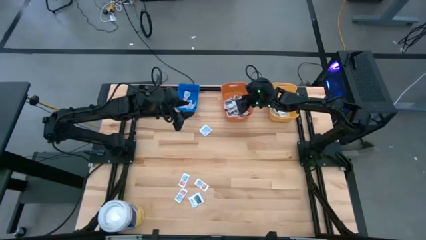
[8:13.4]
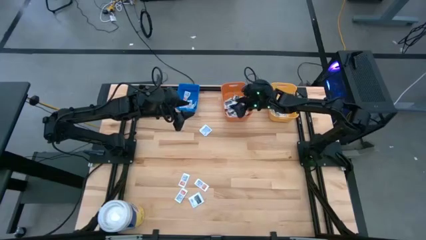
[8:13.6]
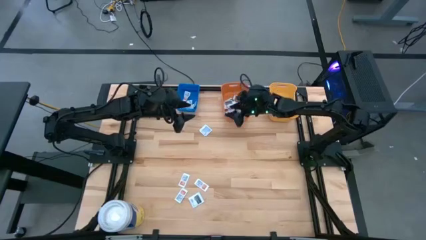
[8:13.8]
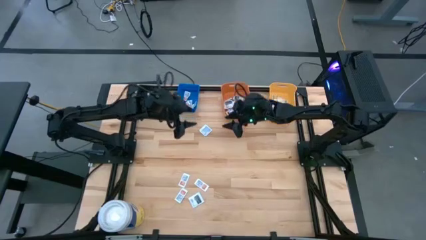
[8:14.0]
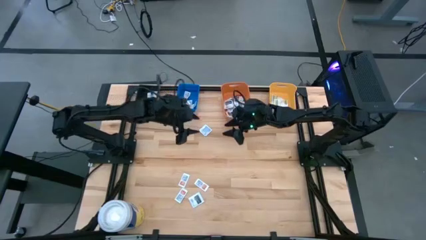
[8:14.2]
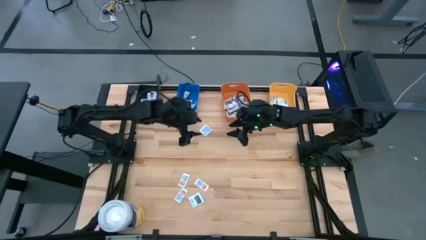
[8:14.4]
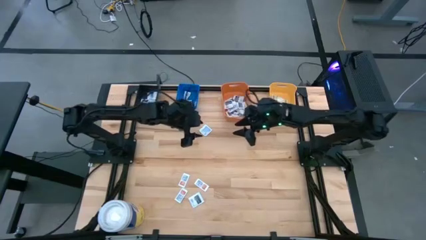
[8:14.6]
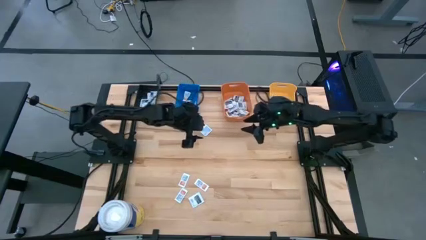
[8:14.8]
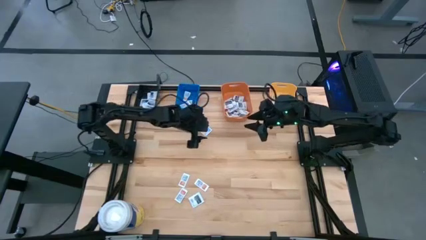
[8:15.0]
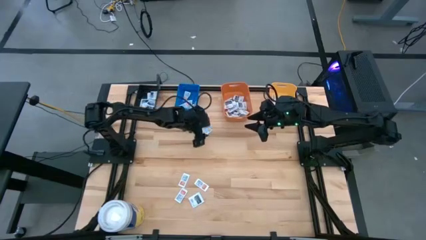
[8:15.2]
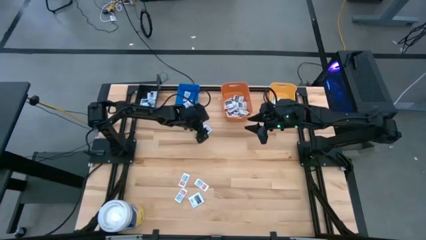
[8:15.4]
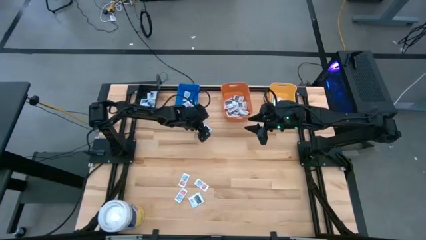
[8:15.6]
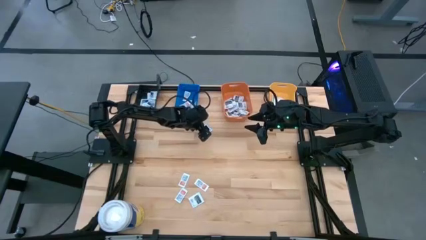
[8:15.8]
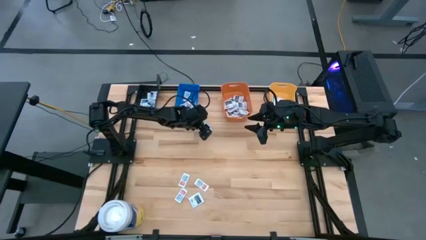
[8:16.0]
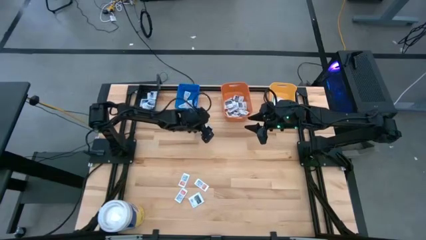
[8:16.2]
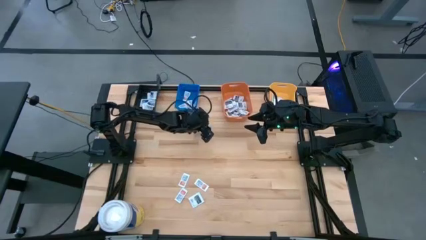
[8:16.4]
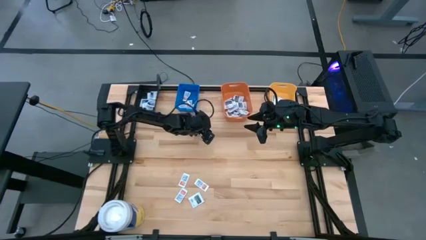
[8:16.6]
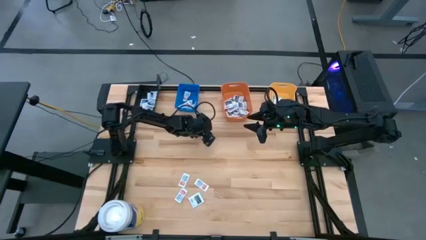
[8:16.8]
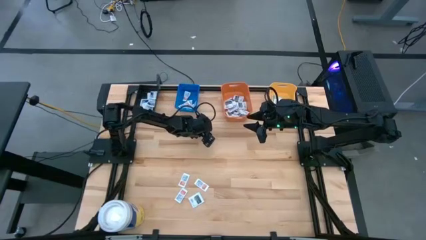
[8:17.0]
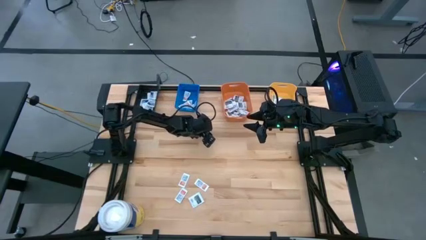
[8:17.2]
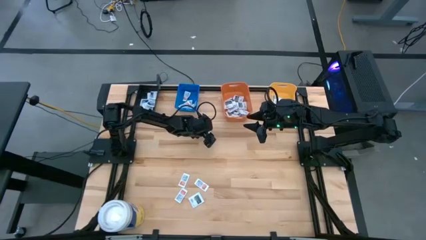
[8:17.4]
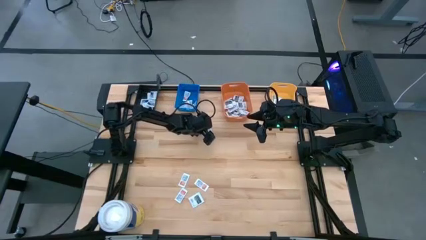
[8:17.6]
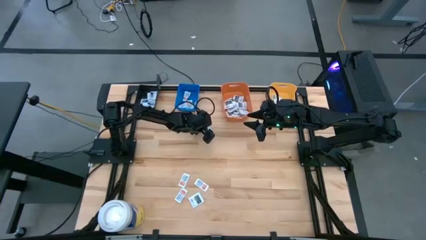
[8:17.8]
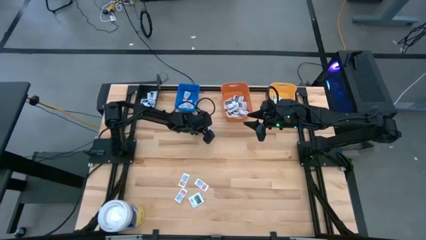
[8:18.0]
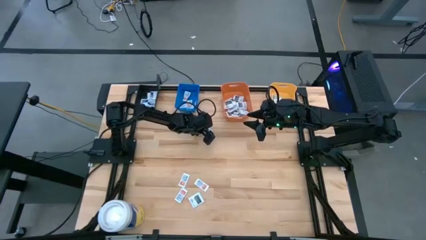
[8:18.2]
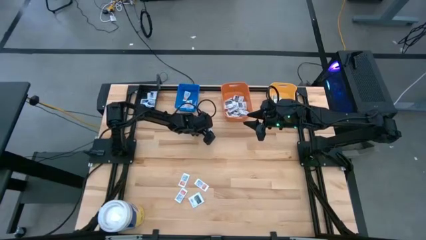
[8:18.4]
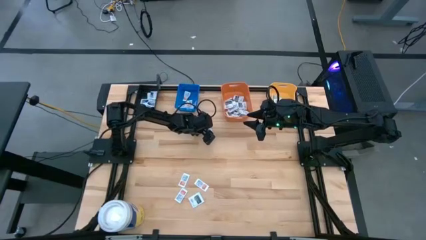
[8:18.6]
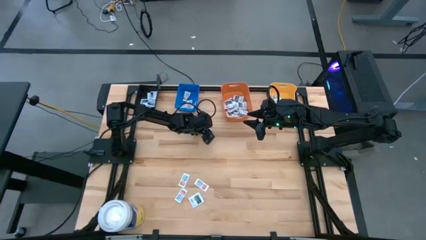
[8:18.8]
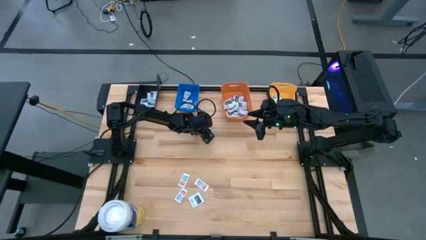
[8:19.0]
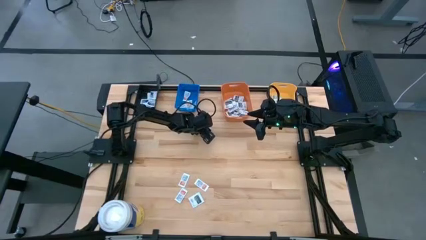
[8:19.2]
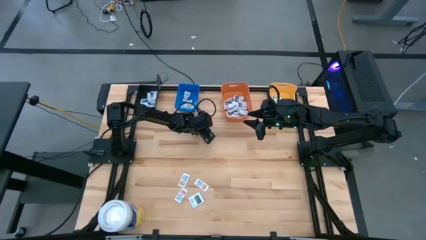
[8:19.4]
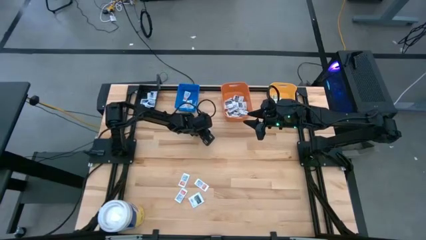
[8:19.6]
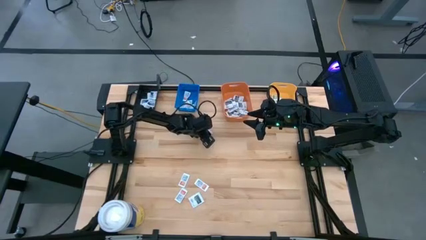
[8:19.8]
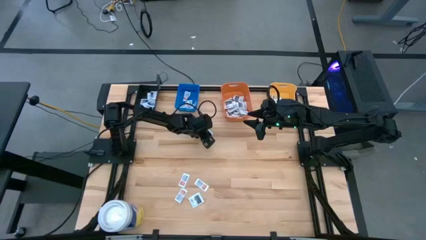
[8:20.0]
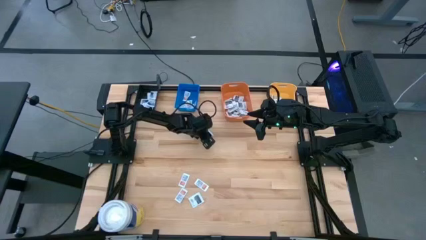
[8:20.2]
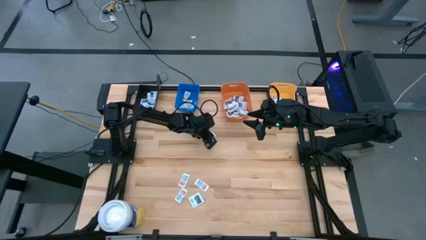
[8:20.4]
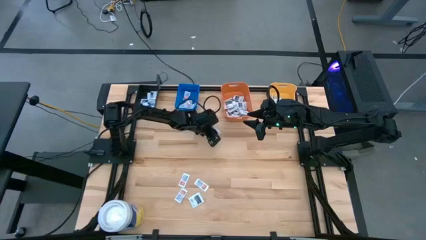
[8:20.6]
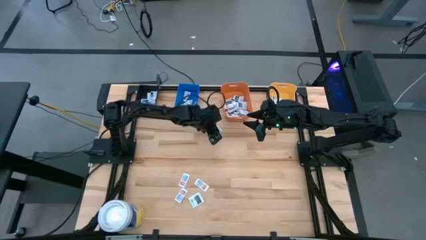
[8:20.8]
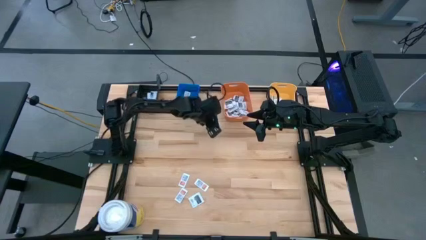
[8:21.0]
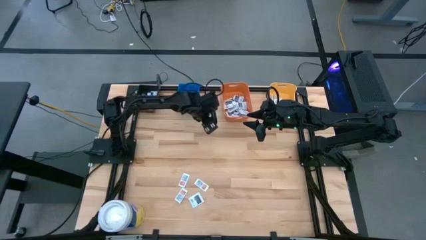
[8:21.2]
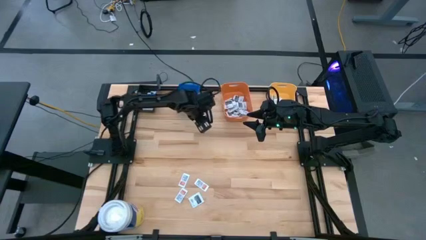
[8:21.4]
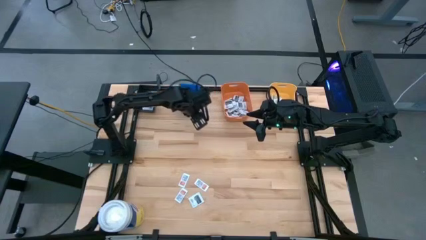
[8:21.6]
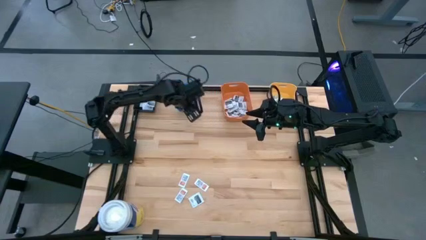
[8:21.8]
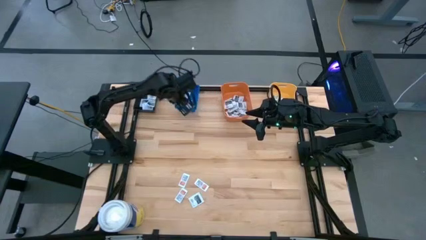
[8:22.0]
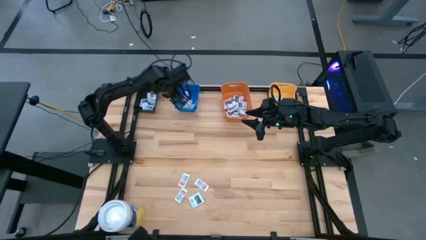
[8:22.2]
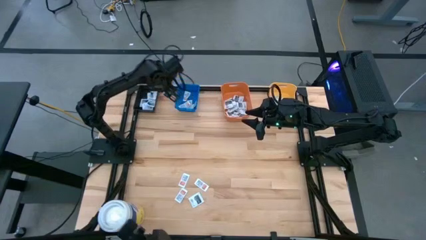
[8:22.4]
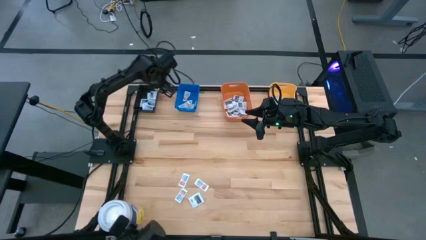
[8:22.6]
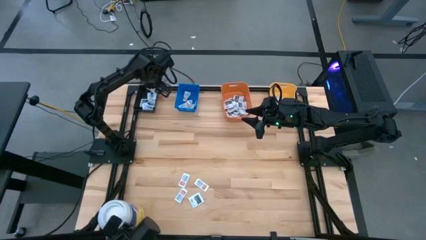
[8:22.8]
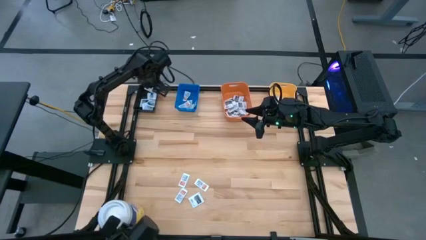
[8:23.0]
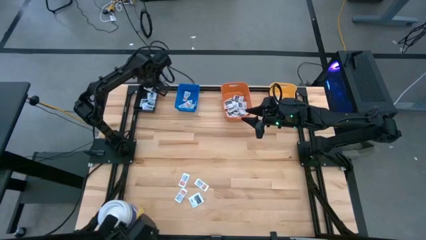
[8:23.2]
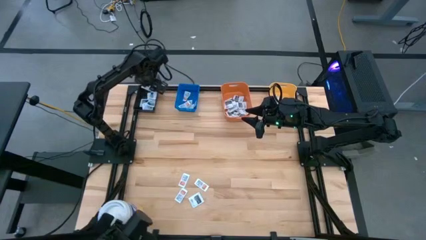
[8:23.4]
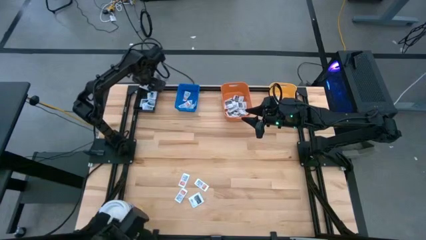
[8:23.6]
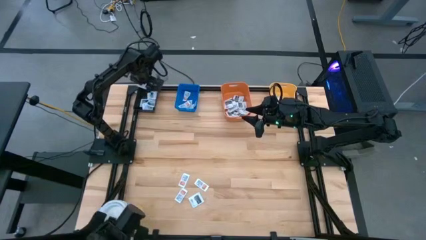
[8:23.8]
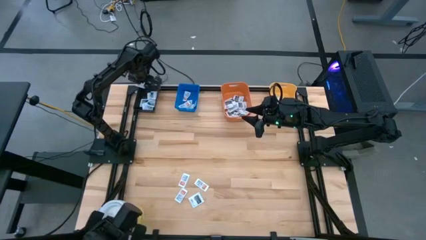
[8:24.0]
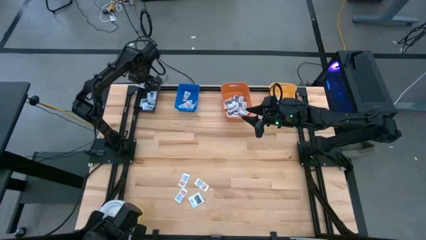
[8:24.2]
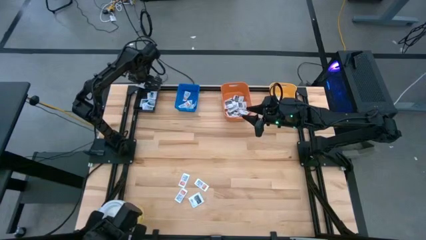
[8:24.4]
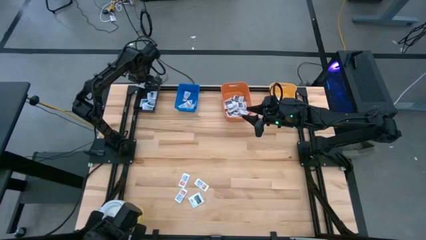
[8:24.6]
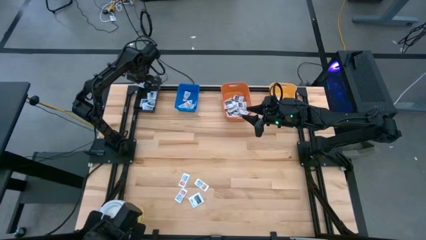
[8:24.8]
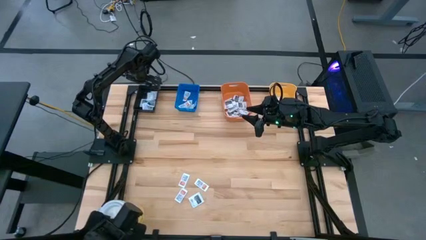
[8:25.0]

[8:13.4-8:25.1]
Task: Pick & Place First Aid Supplies
Put the alcohol pad into the black bin

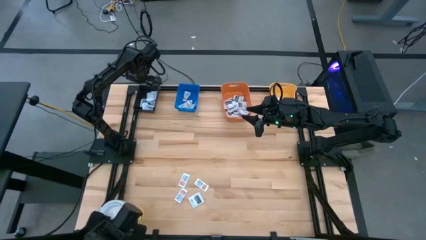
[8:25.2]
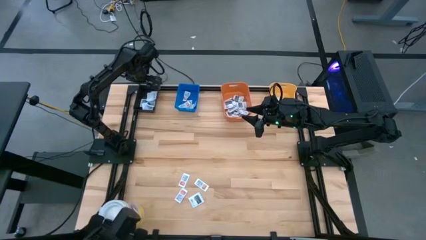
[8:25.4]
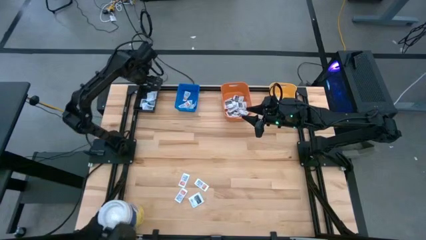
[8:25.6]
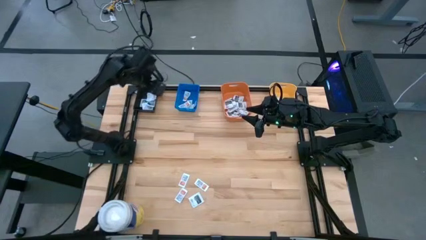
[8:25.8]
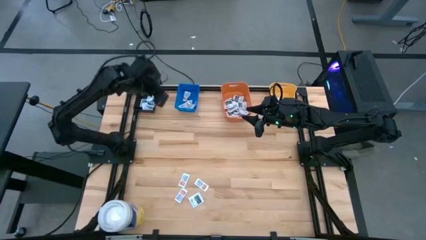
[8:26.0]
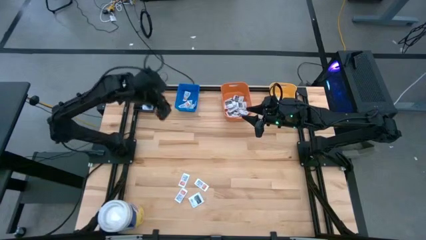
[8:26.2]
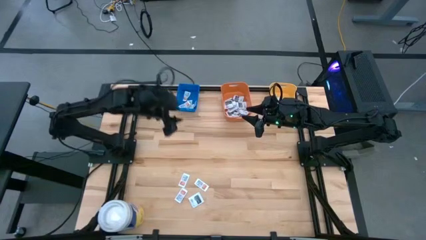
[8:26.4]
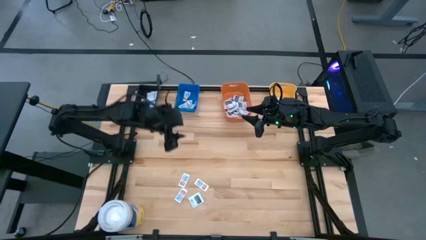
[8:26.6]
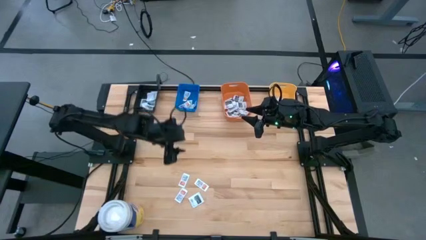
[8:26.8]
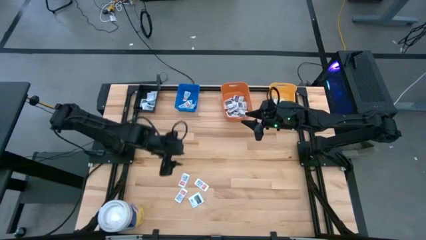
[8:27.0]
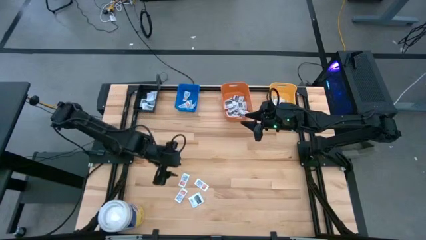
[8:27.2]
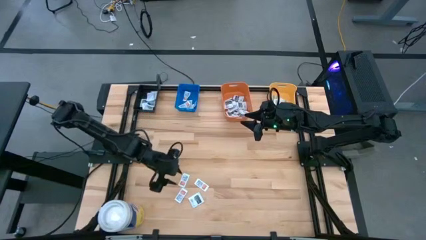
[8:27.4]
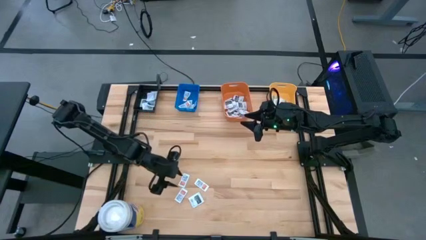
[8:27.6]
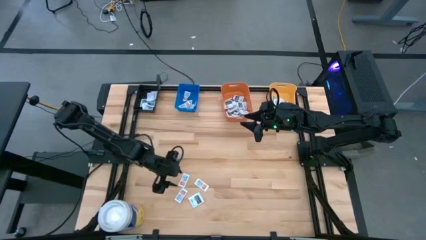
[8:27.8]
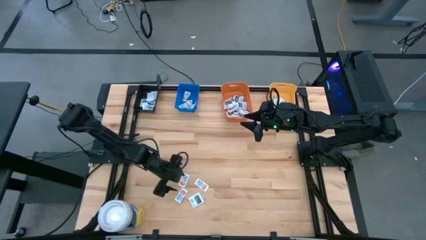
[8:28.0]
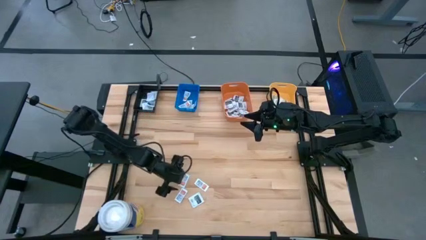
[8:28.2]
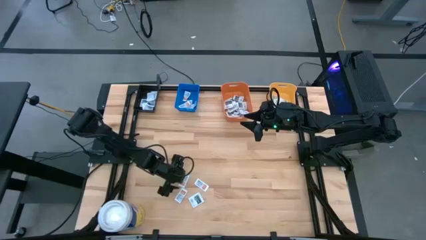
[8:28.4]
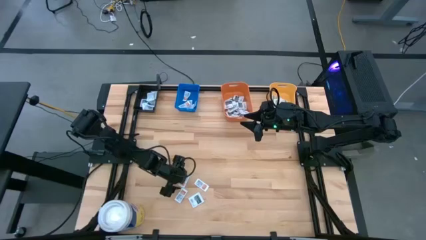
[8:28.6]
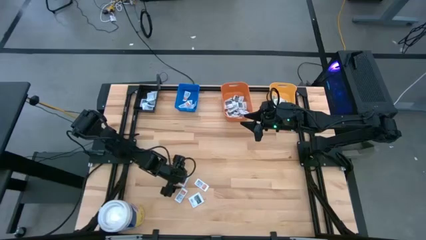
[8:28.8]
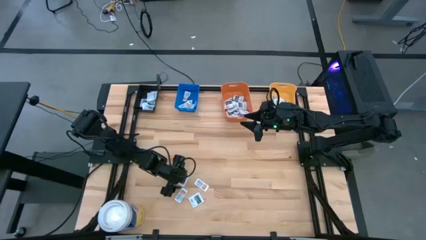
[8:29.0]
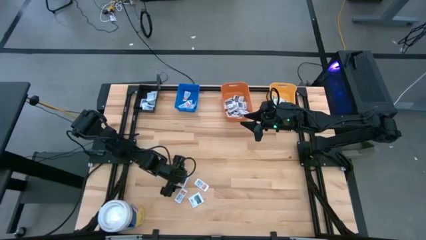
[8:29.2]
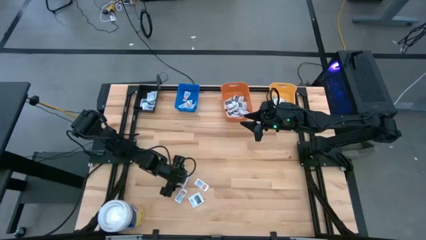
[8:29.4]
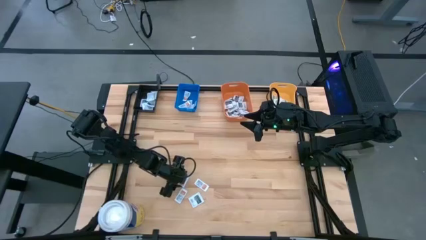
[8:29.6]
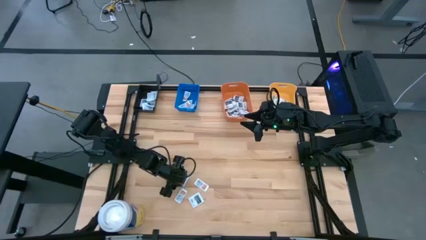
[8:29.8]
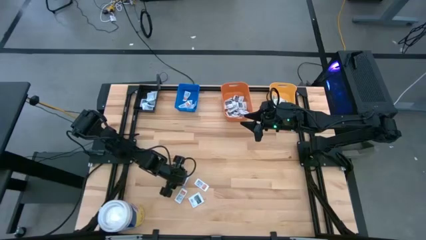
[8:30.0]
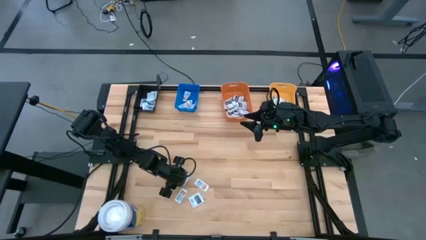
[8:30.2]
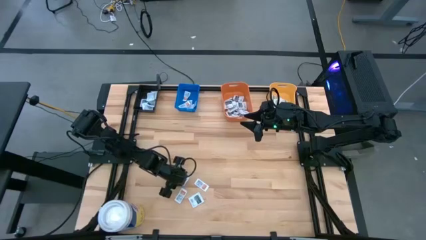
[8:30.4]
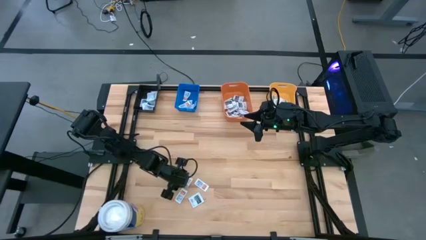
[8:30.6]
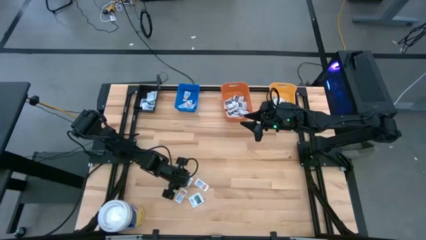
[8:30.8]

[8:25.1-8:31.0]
Put the ointment pack into the blue bin
